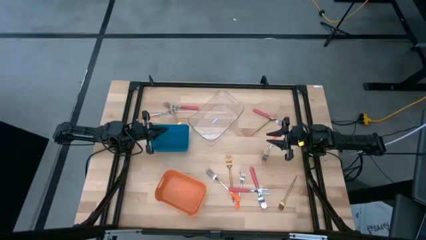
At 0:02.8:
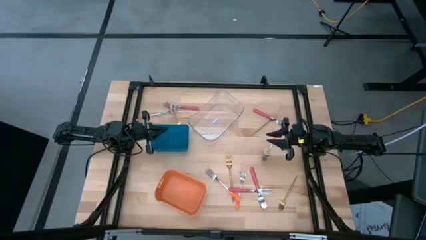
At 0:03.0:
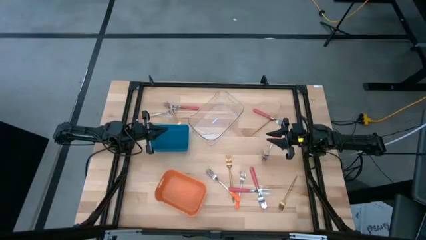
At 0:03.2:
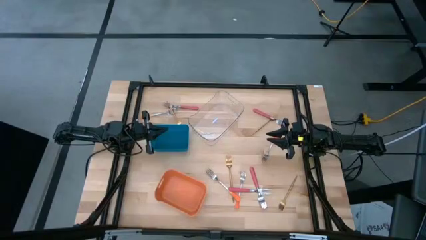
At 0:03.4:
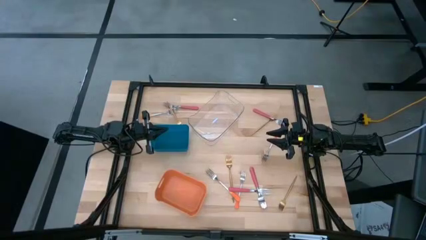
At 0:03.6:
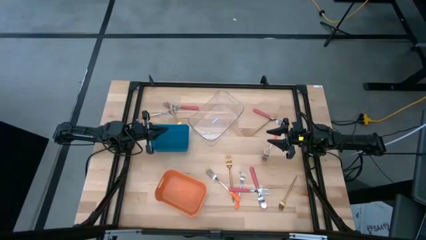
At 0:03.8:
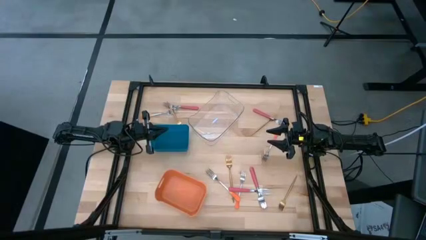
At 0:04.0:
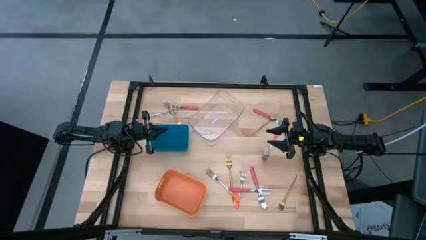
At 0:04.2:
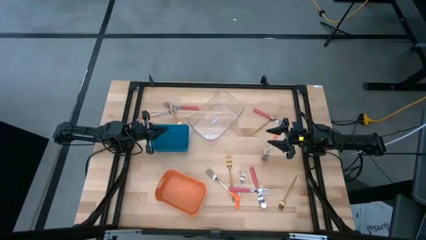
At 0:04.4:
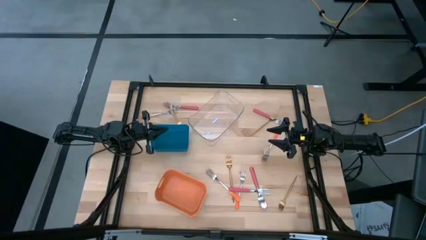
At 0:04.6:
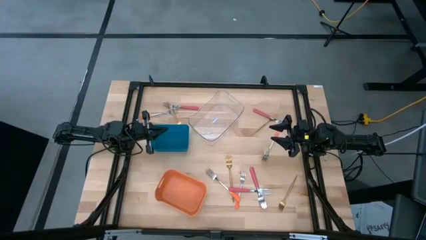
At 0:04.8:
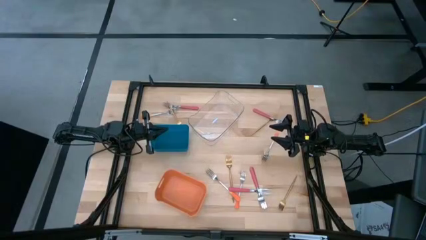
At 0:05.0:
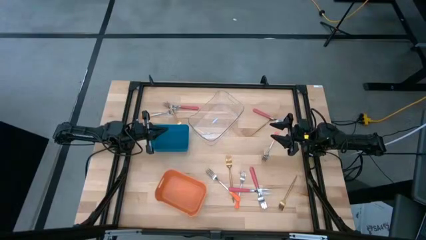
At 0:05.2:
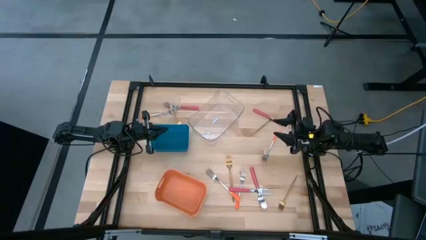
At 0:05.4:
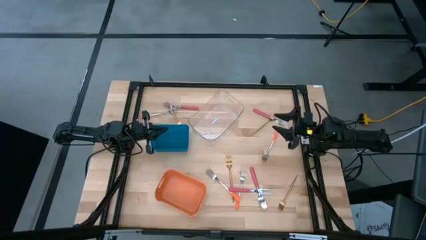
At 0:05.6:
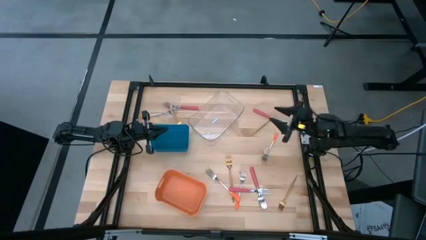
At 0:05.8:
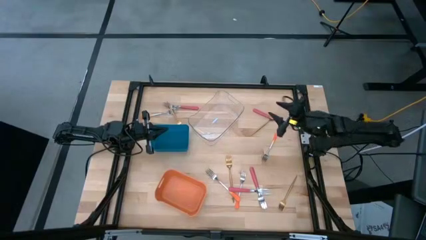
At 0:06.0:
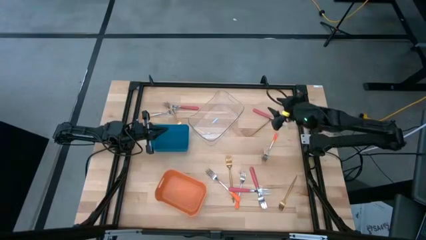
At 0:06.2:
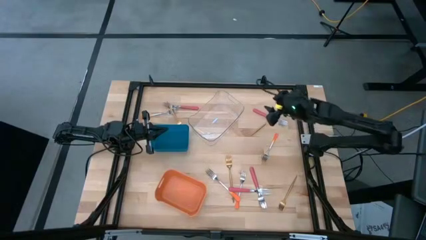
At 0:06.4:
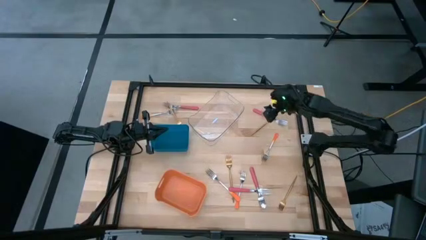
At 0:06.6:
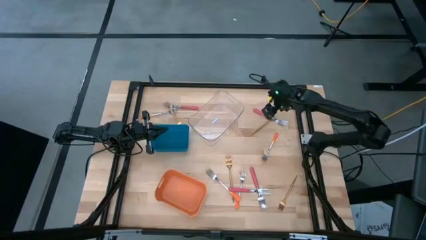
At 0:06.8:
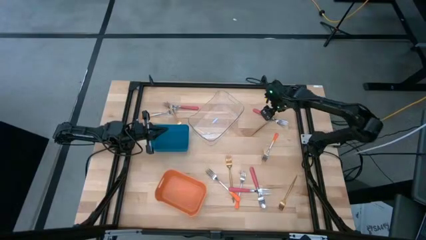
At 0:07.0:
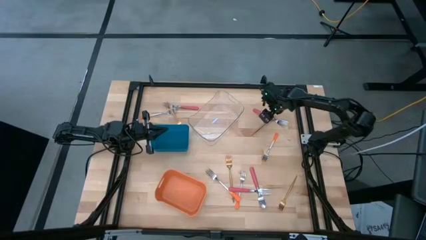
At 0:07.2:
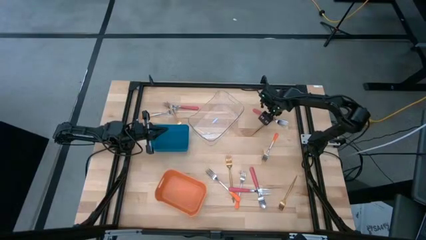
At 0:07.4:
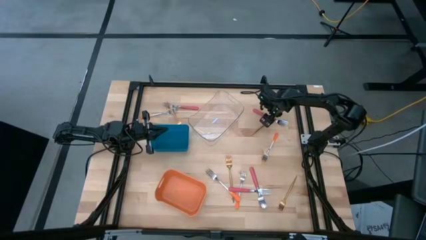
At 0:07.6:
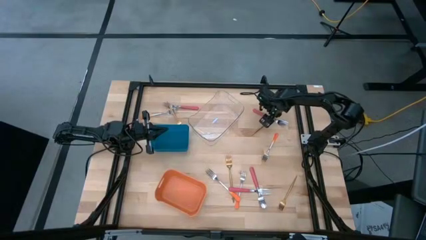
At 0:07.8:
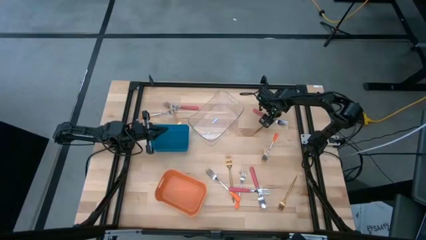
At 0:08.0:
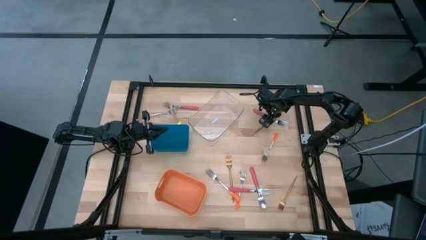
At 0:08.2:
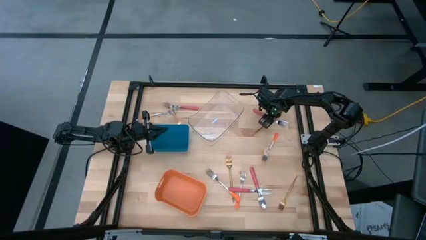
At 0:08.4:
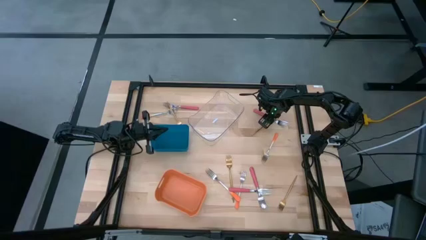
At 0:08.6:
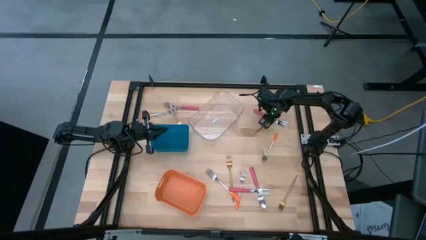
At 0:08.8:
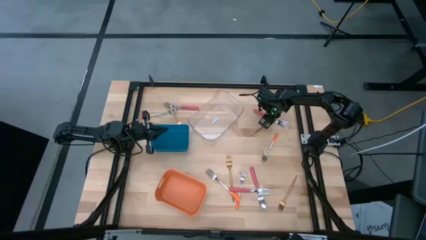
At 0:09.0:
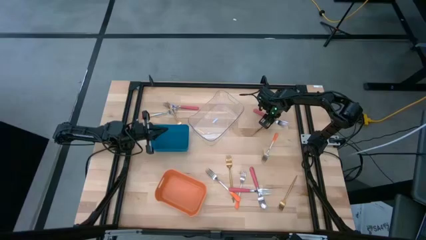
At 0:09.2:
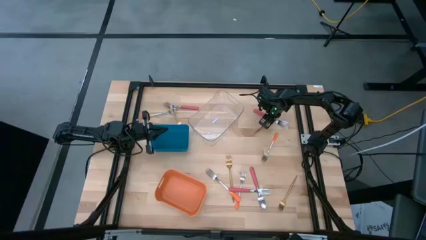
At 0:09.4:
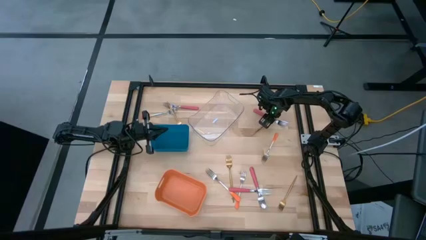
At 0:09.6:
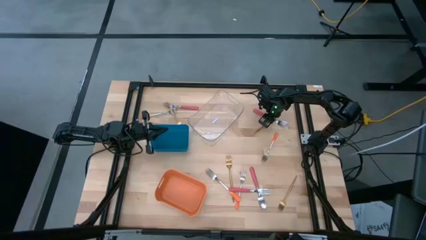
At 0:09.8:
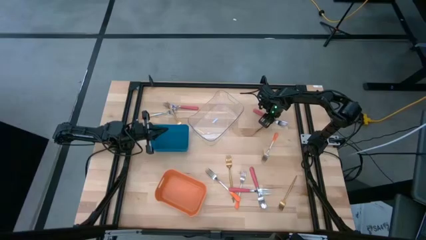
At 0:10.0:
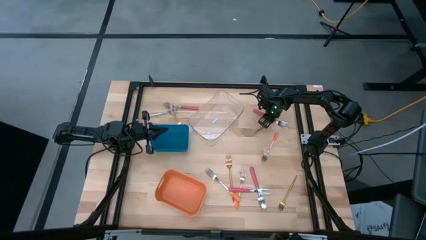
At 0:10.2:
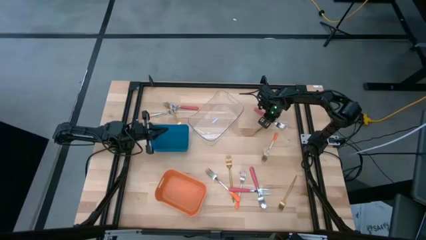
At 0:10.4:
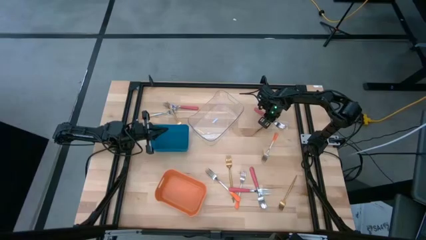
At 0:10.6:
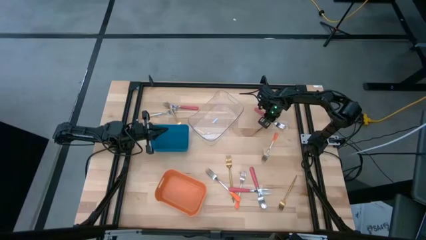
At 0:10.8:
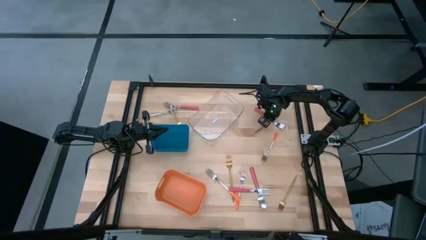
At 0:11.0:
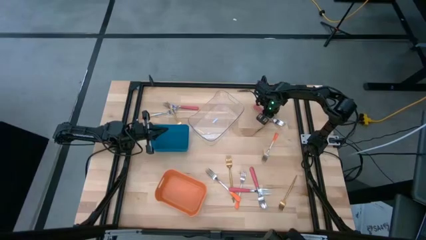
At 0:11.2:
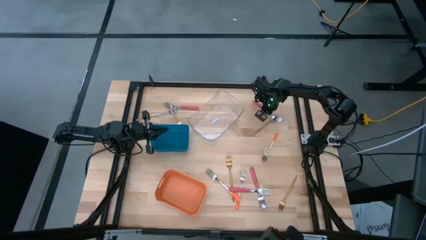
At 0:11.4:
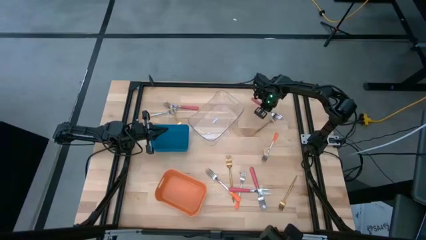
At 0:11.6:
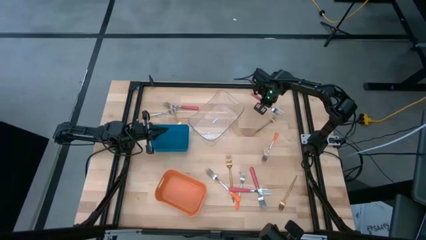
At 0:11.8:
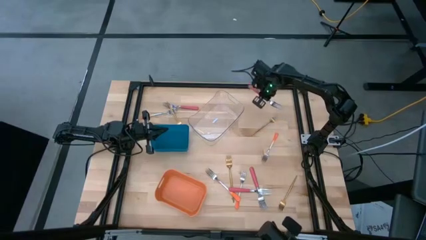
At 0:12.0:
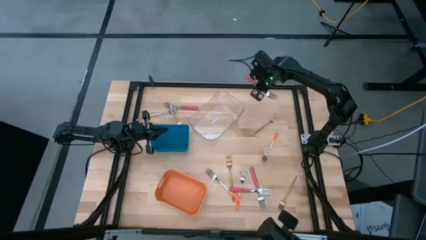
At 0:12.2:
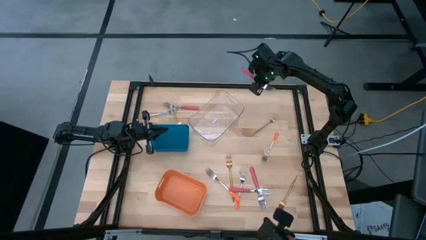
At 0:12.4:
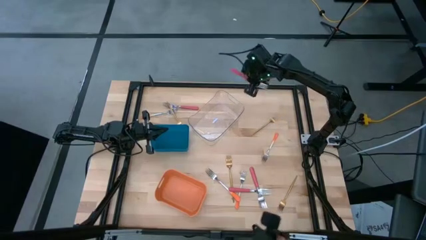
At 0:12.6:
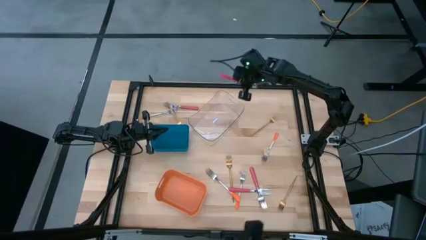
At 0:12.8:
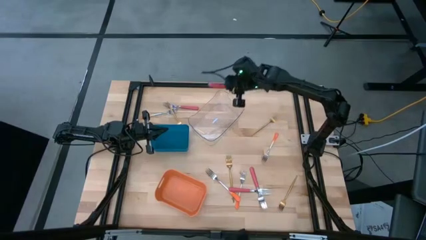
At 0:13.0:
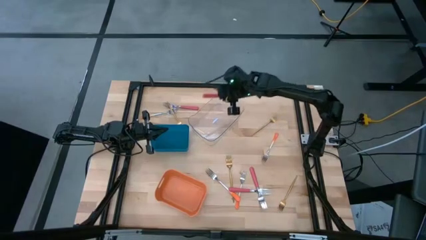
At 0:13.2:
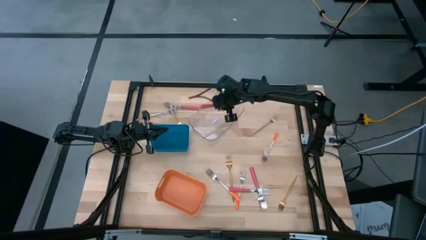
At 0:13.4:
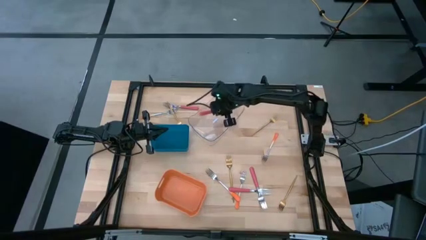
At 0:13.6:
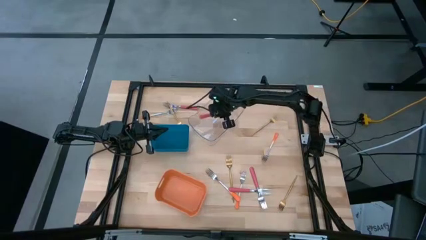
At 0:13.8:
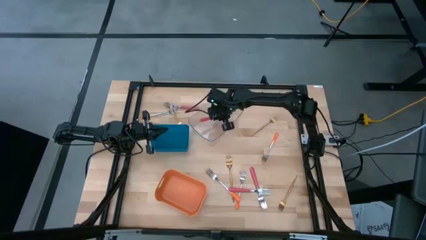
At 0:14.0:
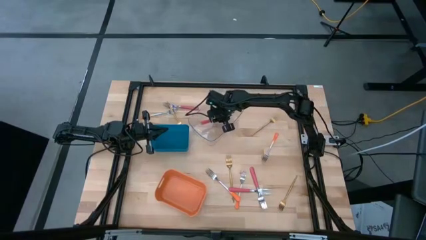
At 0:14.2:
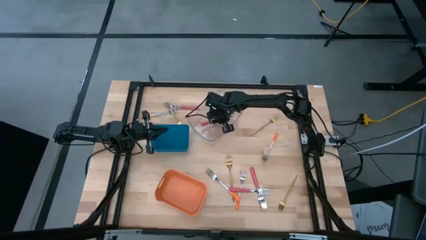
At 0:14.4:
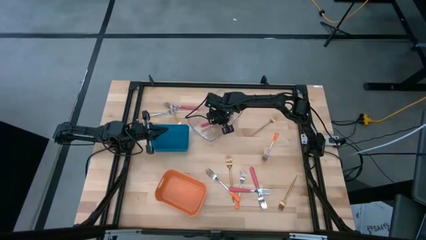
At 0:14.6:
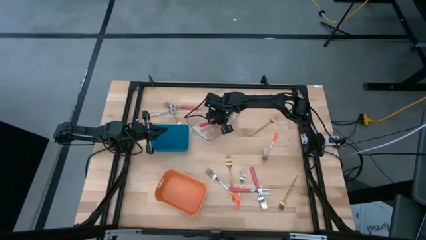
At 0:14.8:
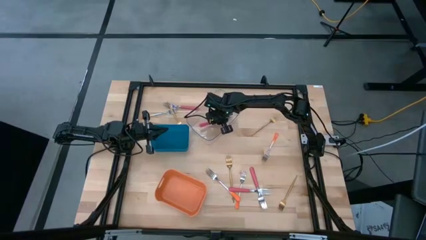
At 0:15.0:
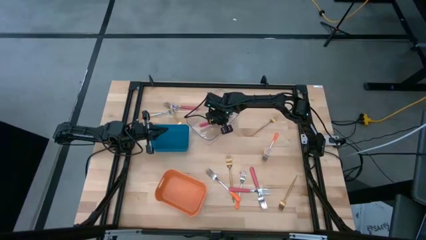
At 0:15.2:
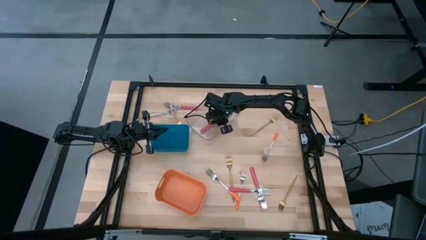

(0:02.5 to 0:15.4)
Task: Sort silverware by color (type)
Put the pink fork into the transparent bin
